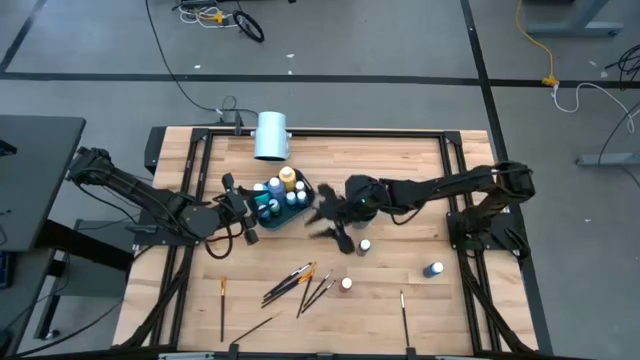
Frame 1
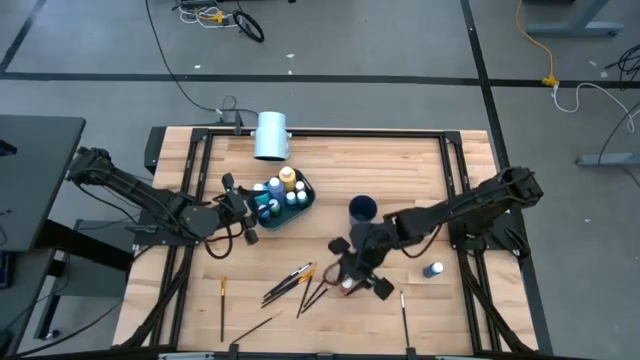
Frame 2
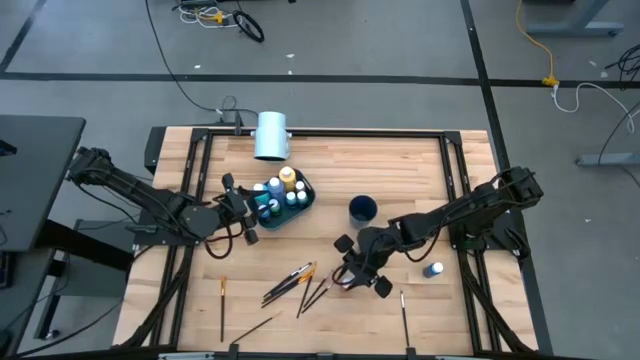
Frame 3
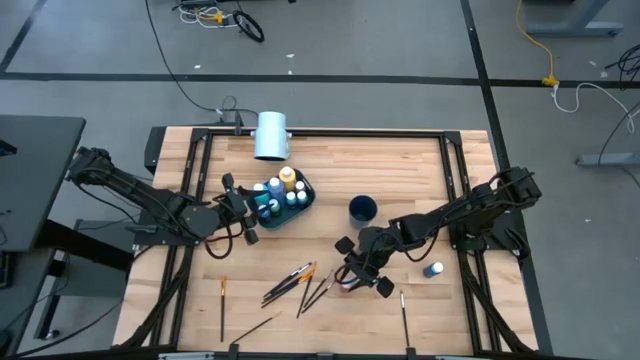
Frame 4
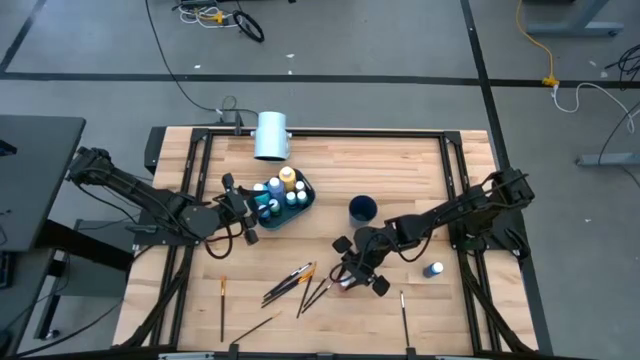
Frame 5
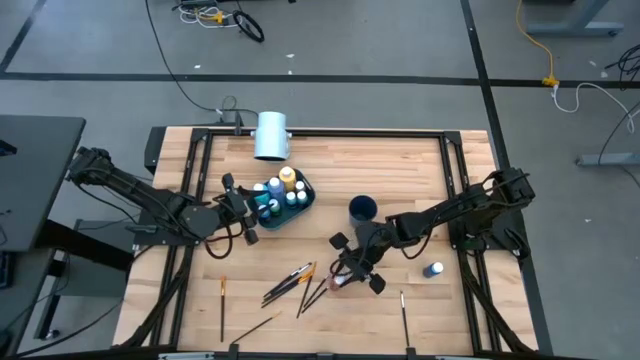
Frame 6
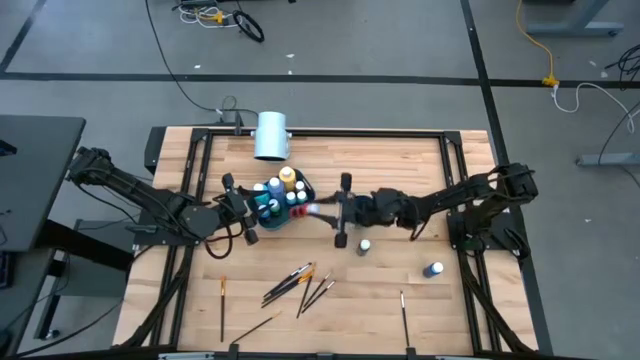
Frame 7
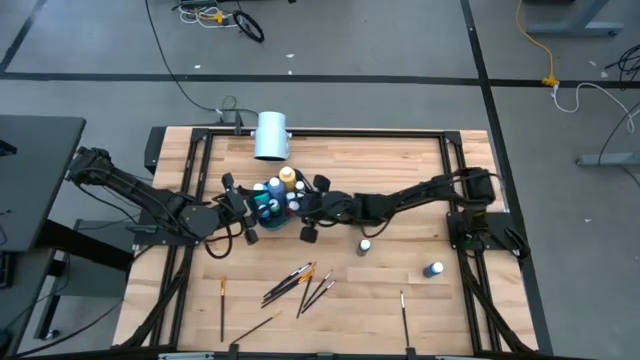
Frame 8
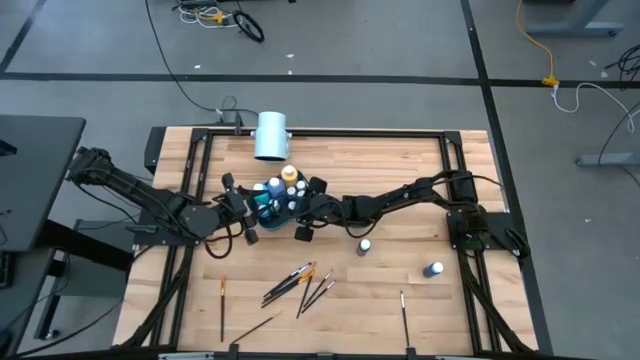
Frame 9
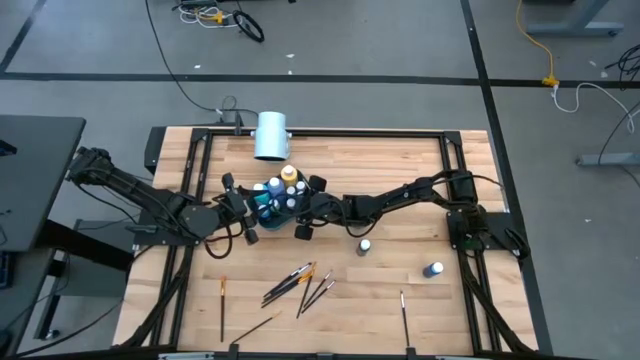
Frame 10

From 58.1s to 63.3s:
Task: Pick & Place Paint Supplies
Put the small orange black paint bottle into the blue bin

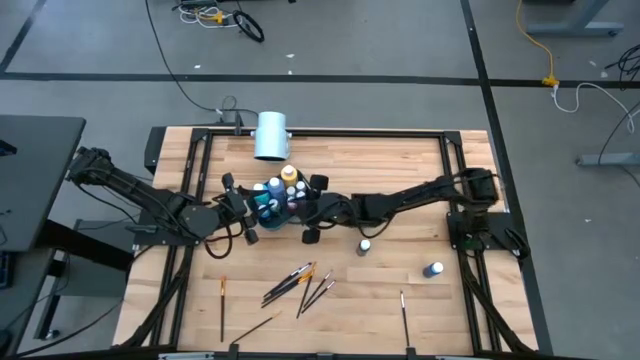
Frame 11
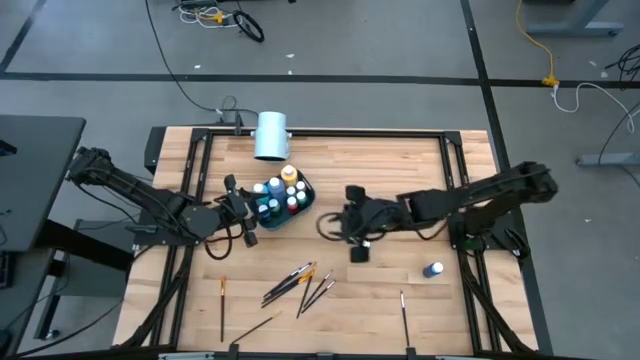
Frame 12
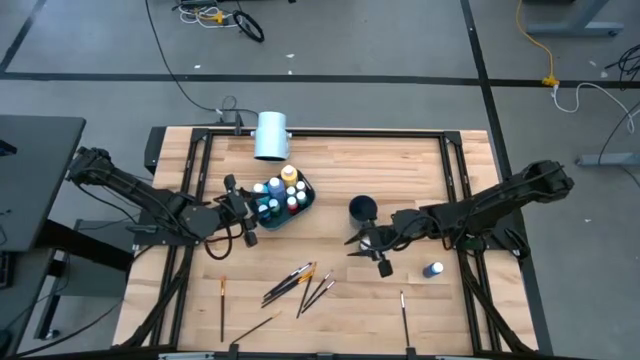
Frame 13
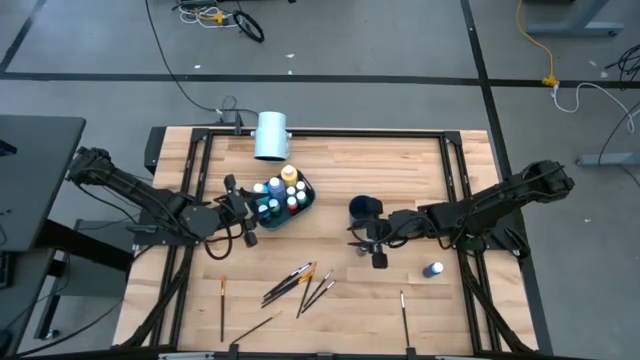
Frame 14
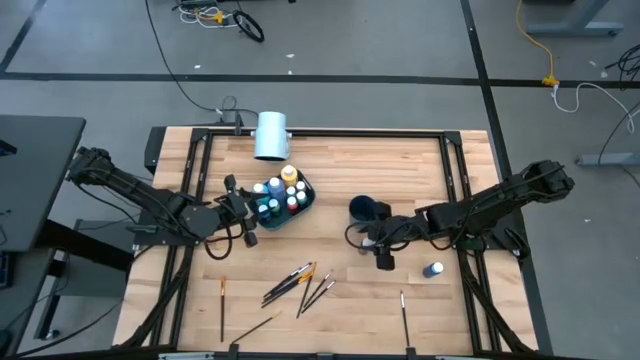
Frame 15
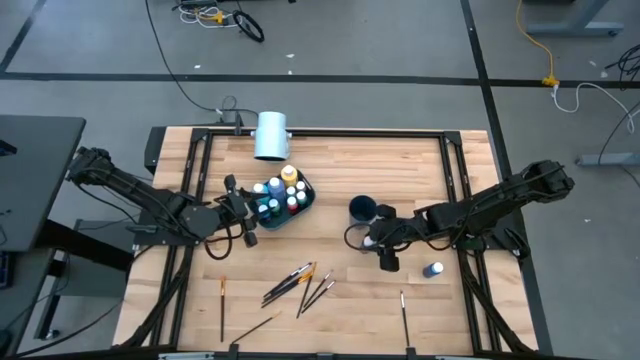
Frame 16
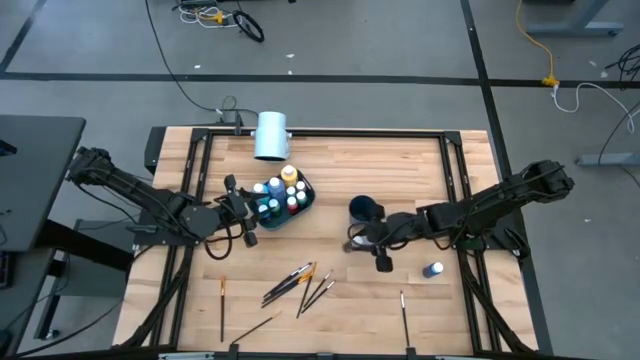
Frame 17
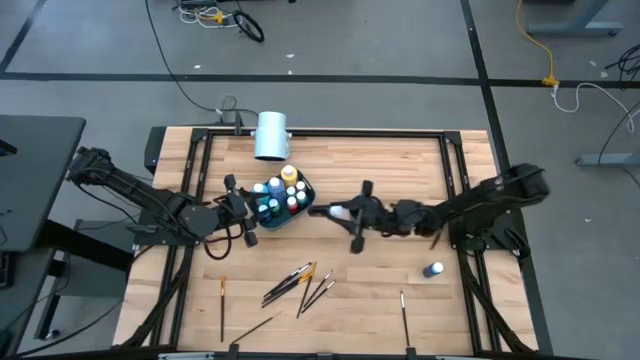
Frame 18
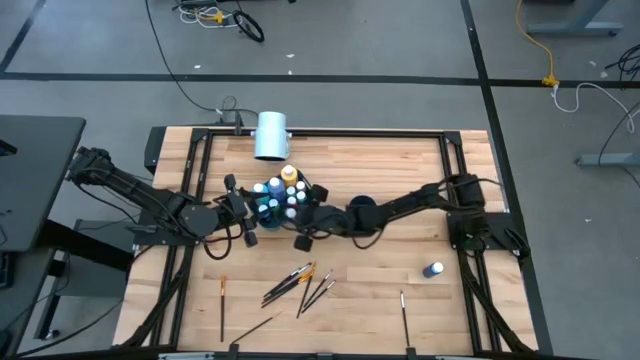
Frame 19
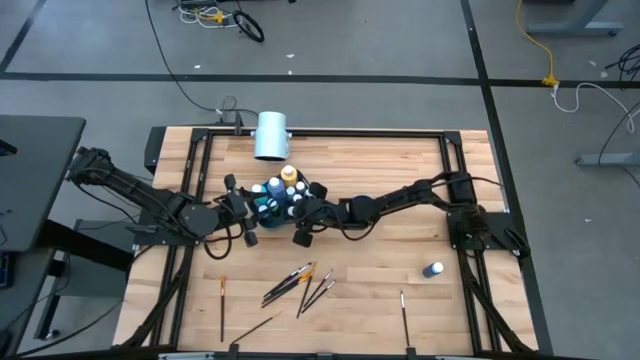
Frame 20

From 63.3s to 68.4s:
Put the small black paint bottle into the blue bin

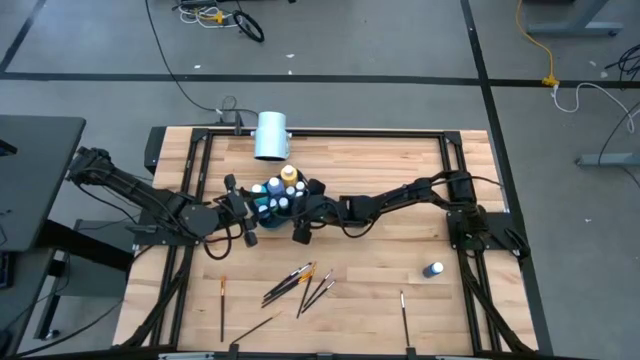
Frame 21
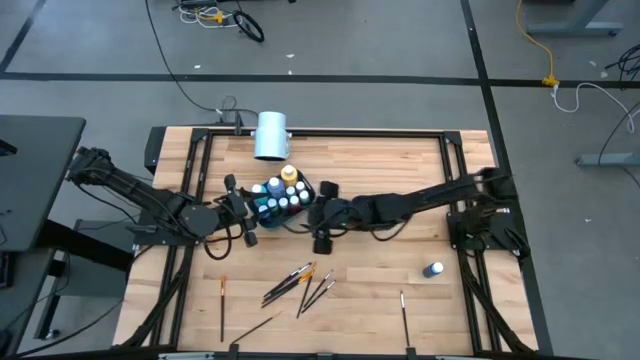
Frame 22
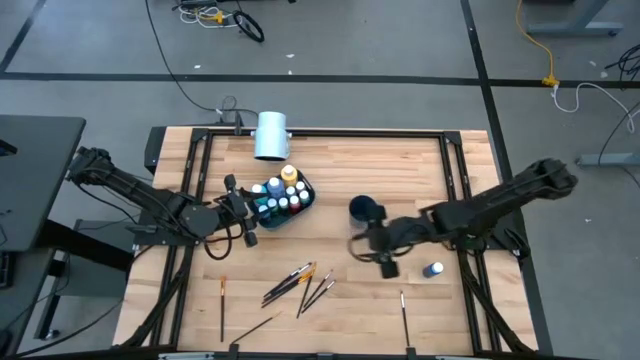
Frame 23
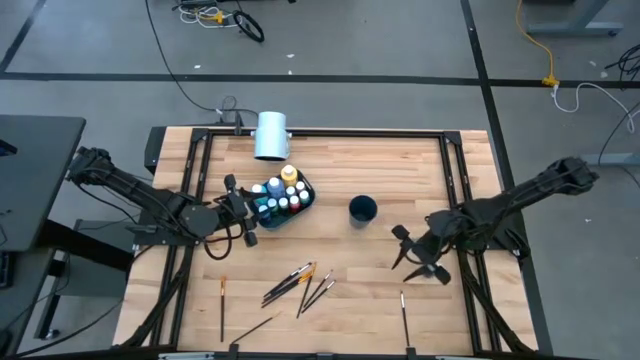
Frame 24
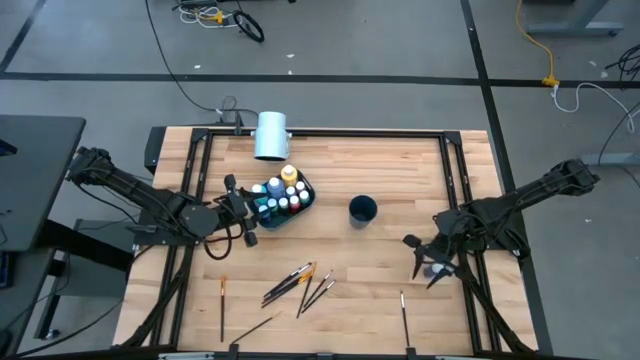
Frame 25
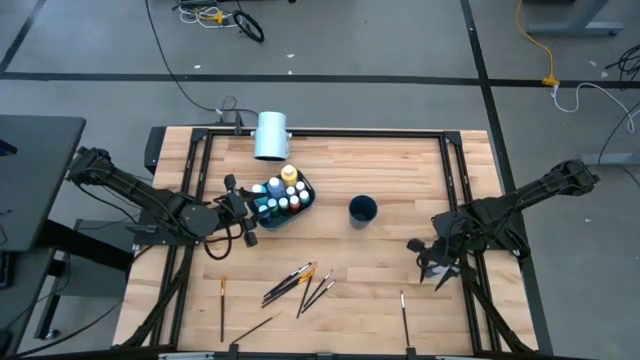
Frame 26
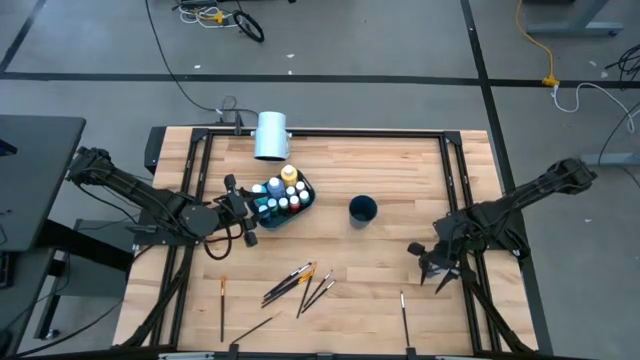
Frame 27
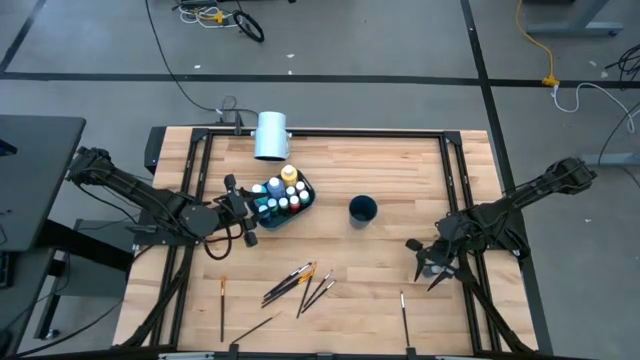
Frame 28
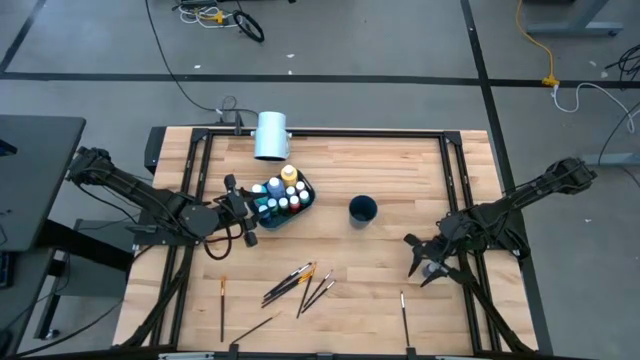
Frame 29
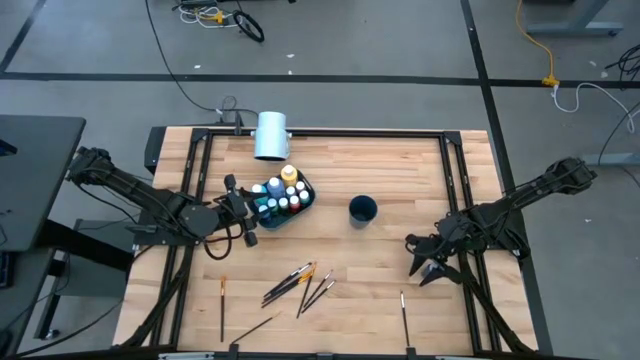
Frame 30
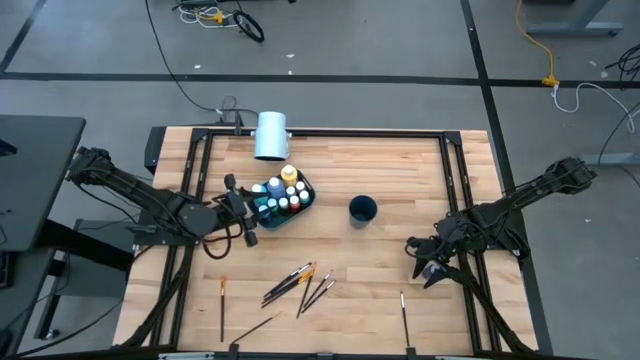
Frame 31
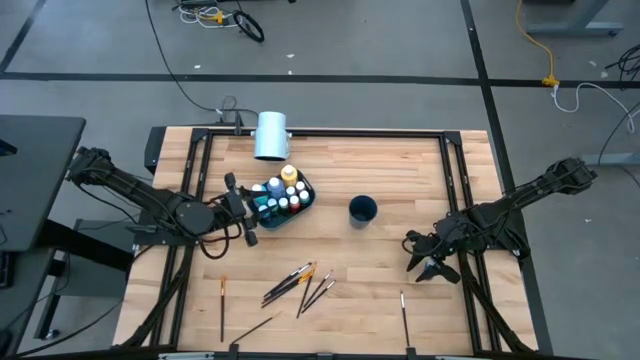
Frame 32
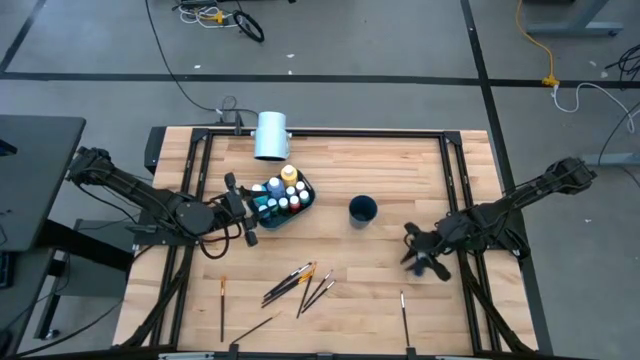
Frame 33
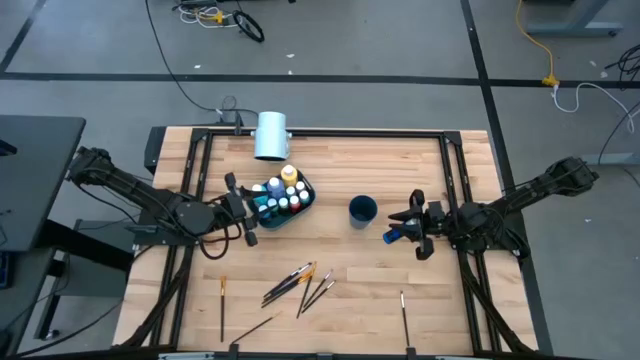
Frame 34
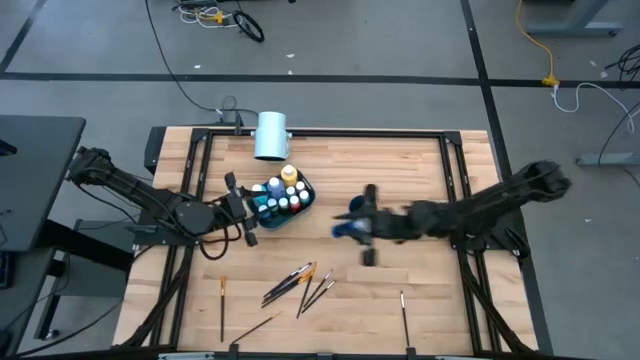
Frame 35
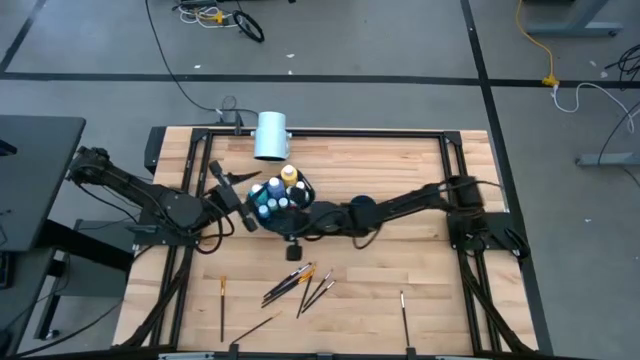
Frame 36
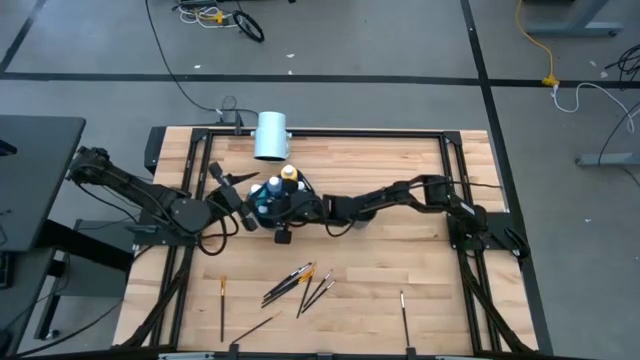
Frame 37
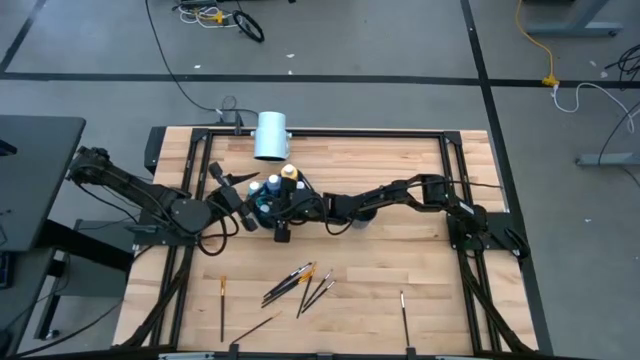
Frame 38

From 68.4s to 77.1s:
Put the purple paint bottle into the blue bin

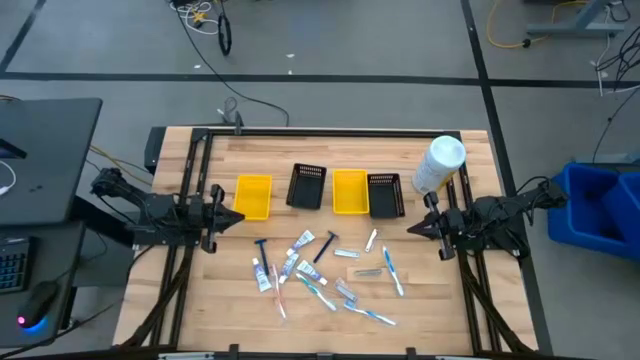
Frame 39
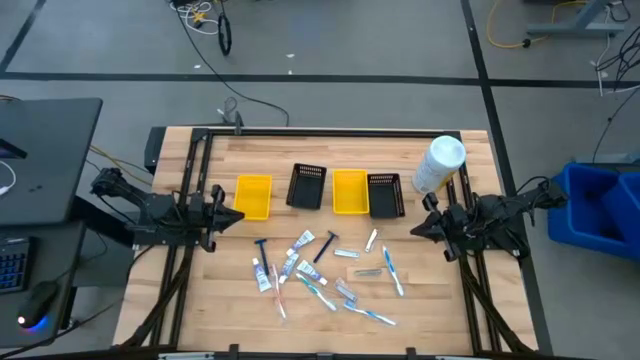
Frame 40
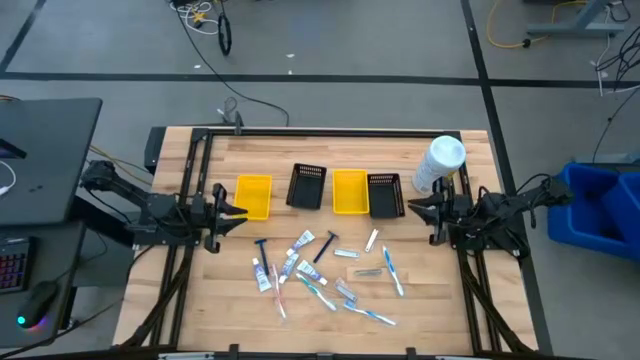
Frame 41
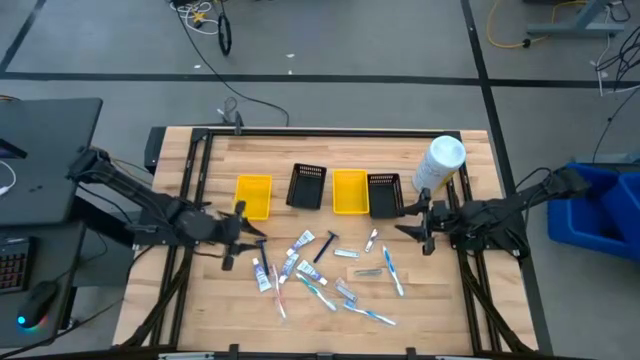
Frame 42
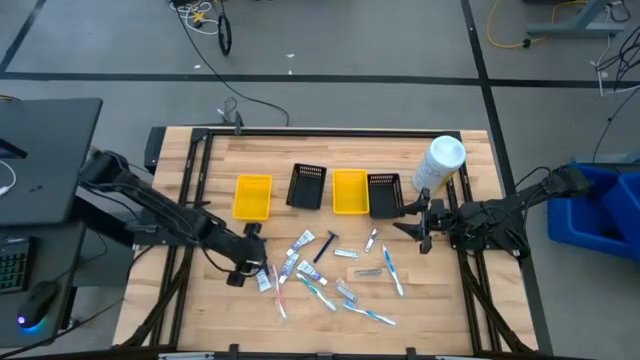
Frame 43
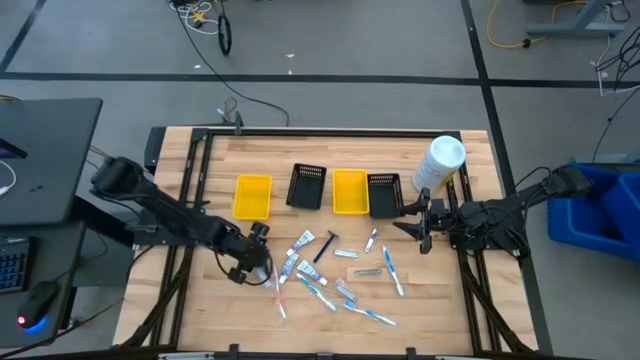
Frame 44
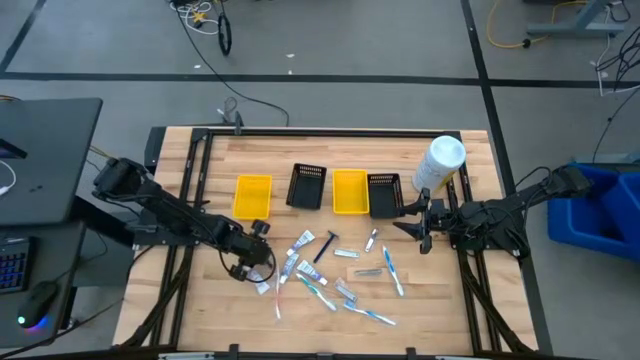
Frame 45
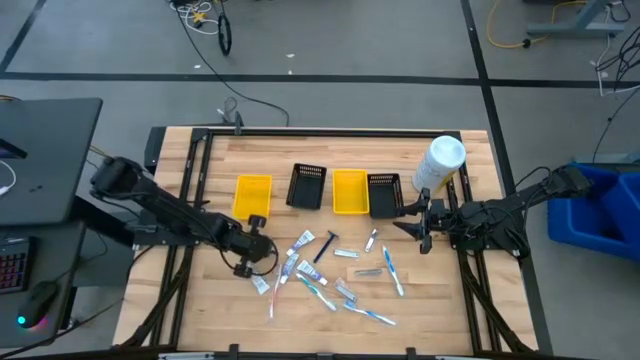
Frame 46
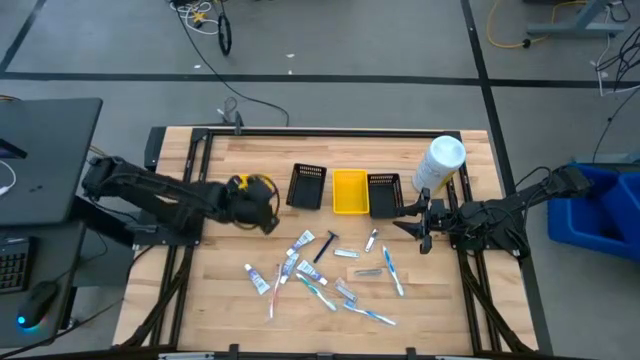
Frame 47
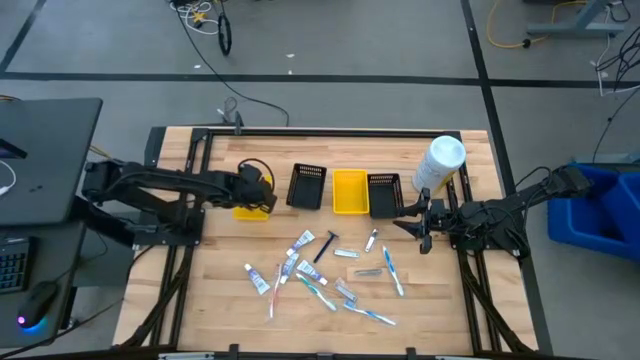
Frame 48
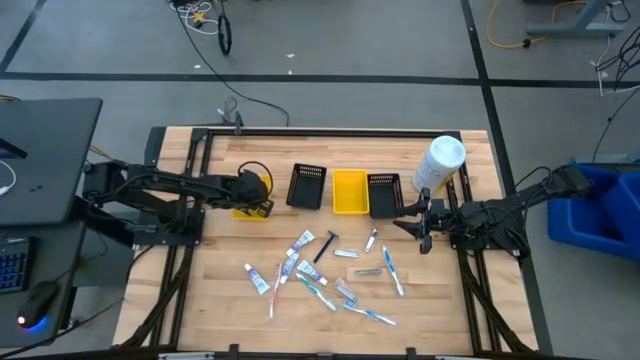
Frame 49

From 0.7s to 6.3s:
Task: Pick & Place Travel size toiletries
Put the blue razor into the left yellow bin
